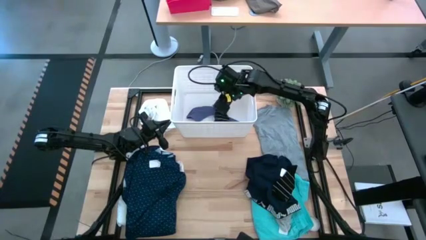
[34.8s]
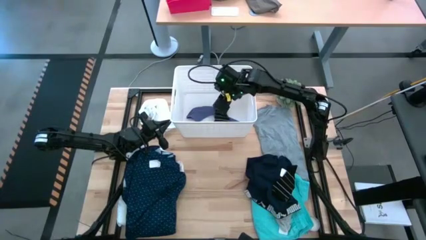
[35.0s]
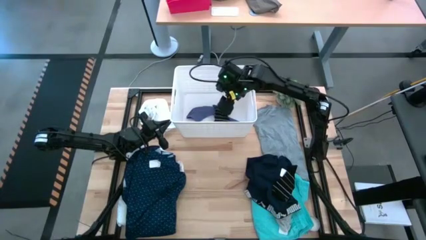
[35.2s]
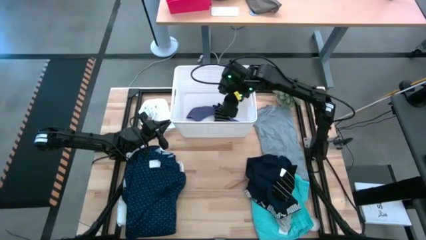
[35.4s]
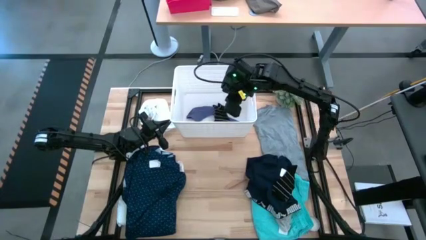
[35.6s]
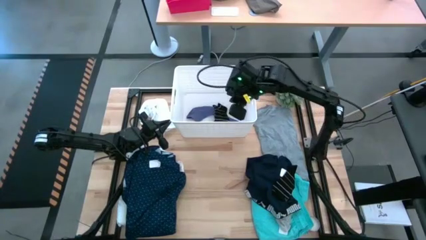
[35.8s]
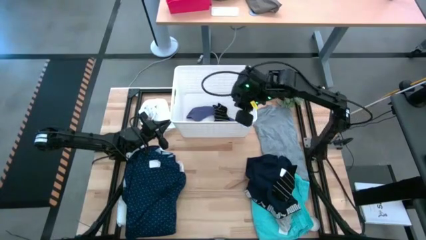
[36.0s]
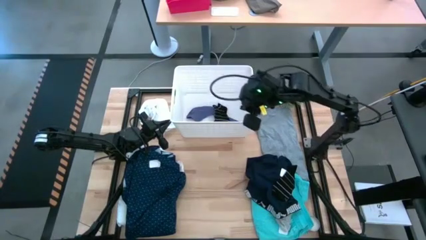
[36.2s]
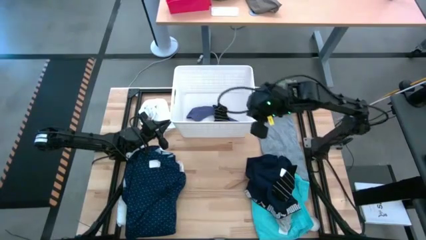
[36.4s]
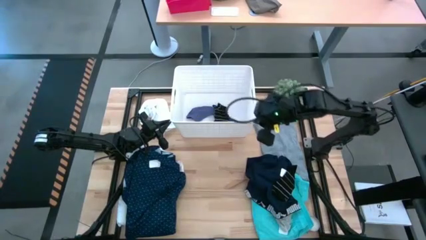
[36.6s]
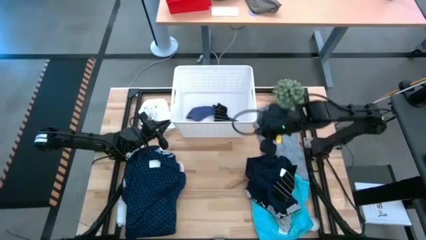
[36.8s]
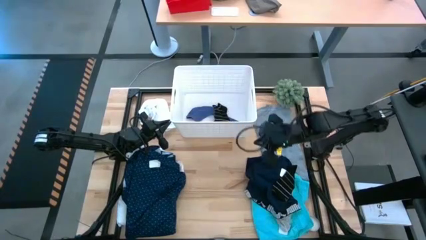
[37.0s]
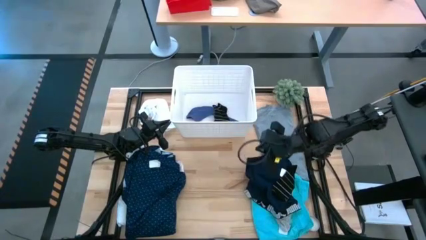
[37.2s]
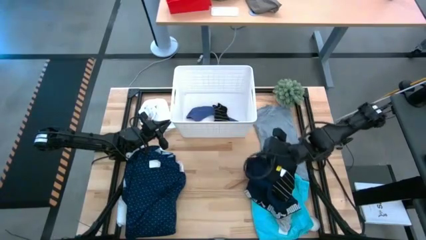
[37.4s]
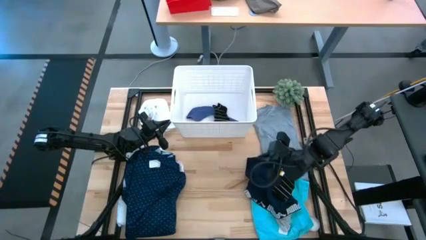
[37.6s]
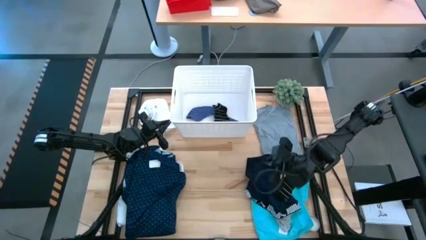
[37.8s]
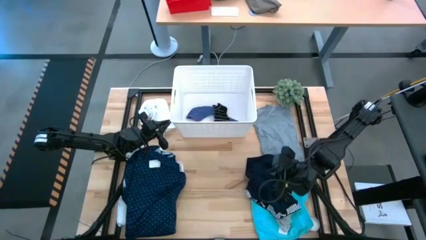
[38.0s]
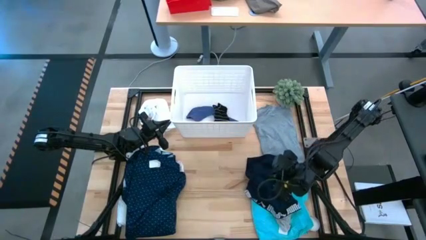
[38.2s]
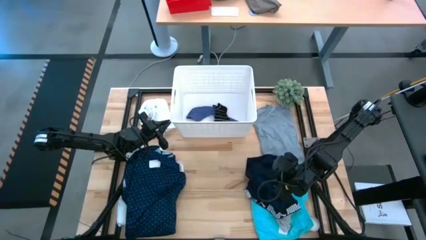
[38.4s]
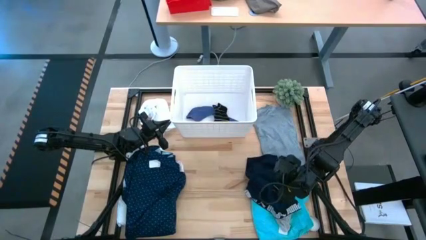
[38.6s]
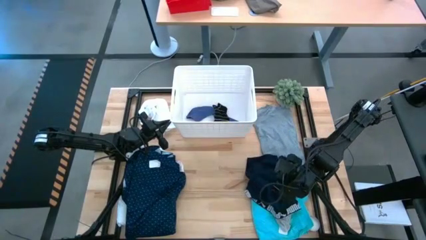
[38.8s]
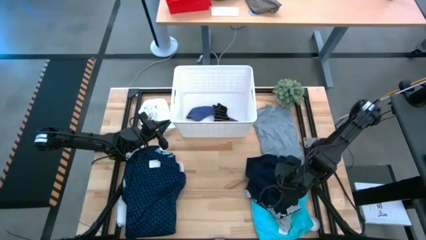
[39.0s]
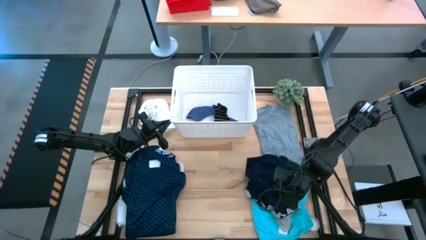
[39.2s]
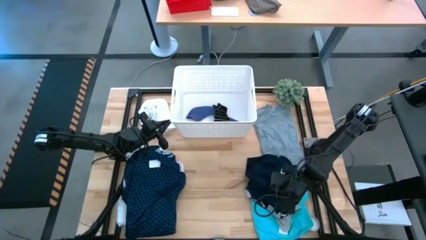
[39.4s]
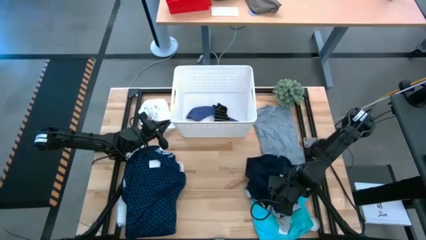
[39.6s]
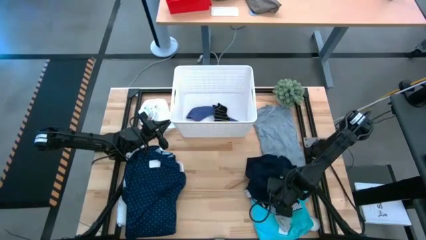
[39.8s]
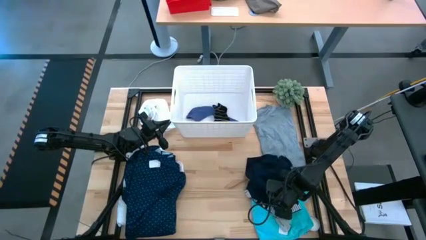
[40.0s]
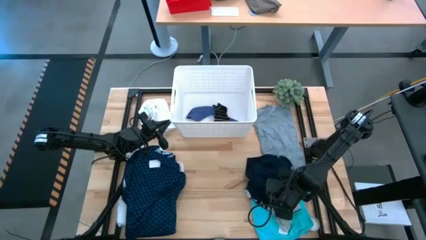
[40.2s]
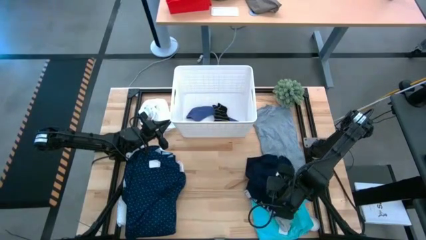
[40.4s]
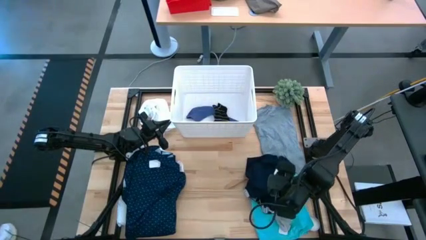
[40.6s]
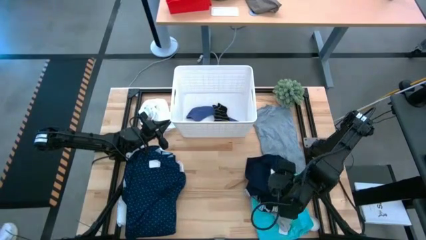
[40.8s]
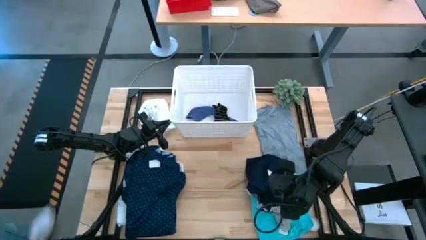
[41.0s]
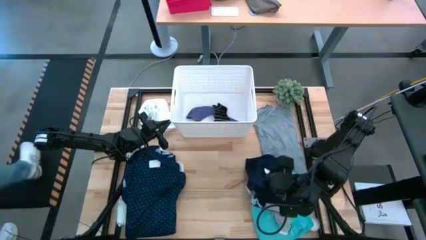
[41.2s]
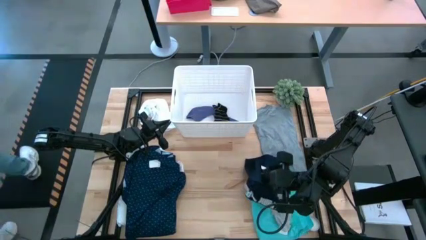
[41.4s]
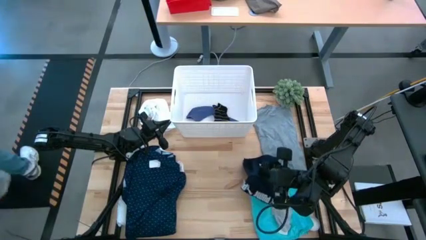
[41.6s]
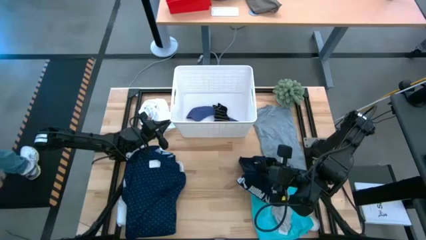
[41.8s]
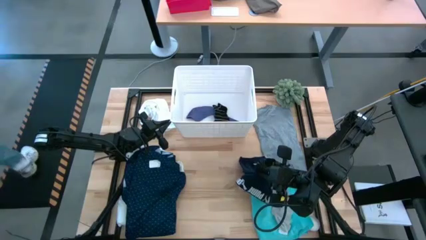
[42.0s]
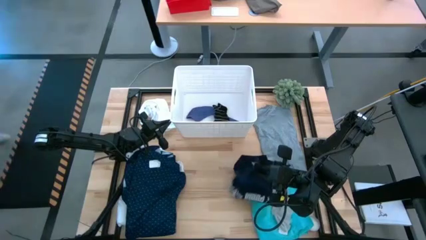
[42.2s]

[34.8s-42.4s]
Task: Sort clothes
Put the black striped sock into the white laundry bin

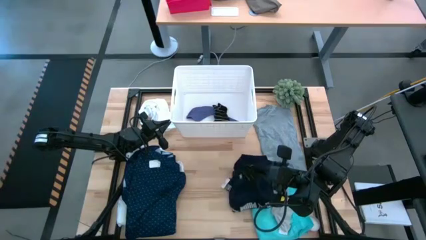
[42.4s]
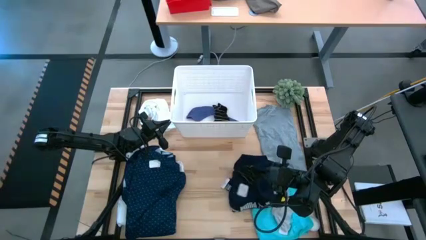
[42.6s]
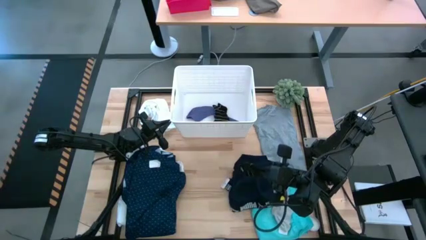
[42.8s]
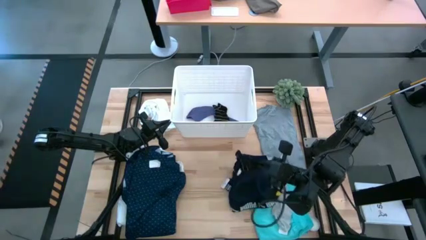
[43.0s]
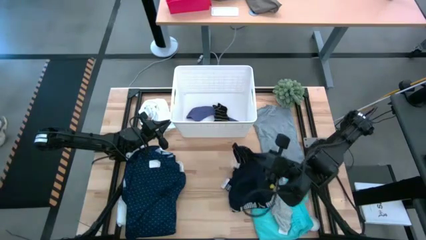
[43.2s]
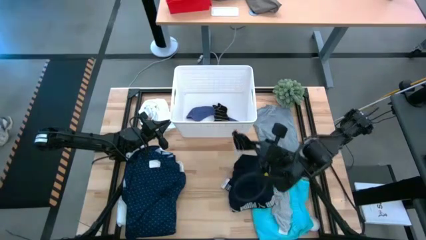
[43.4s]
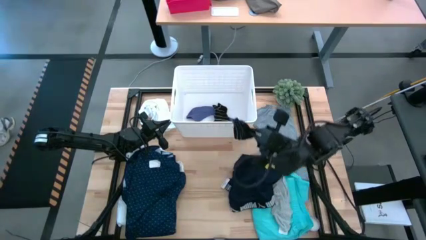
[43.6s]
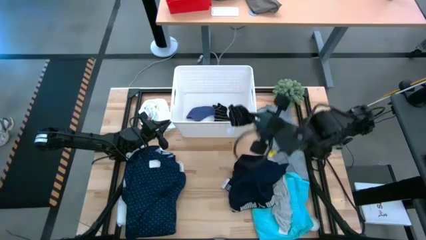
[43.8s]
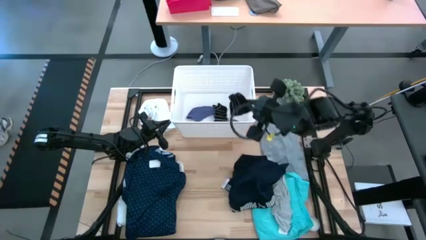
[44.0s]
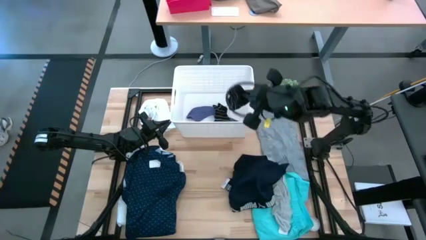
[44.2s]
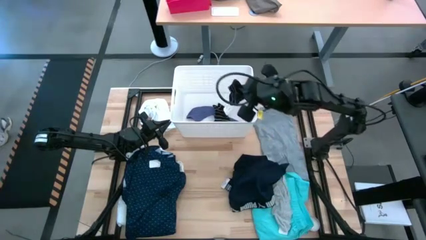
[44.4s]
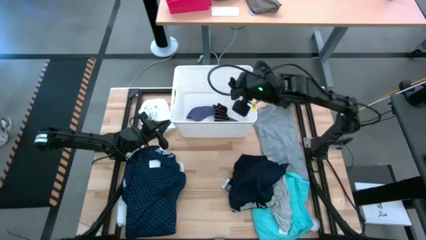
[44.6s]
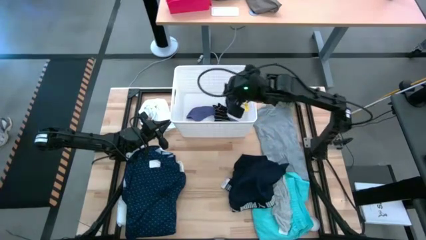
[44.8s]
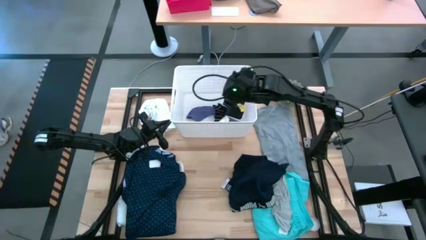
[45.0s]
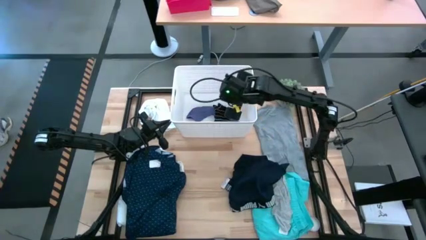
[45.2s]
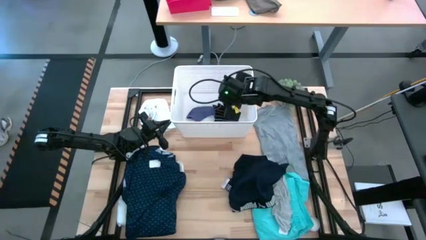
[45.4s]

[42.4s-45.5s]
Put the black striped sock into the white laundry bin

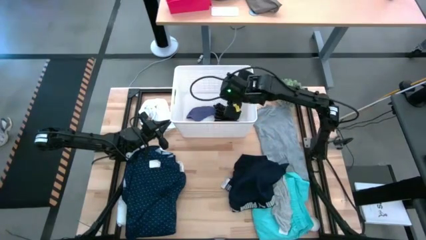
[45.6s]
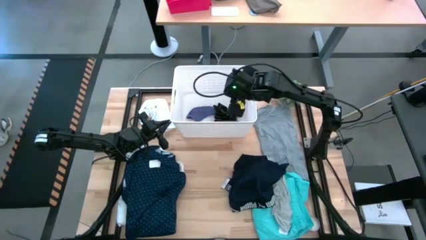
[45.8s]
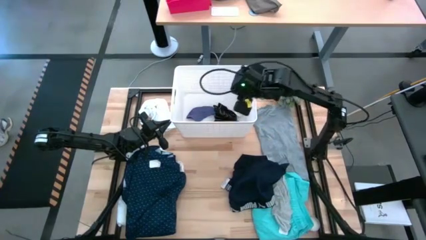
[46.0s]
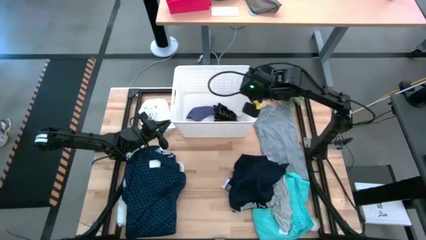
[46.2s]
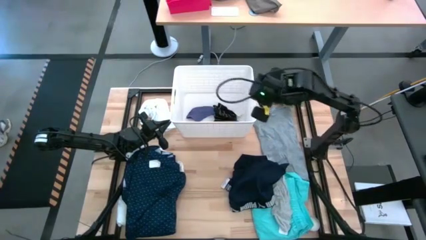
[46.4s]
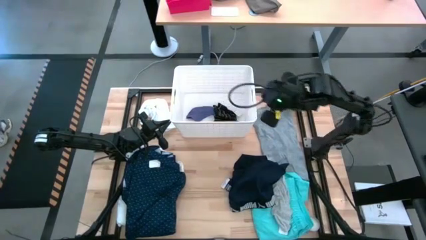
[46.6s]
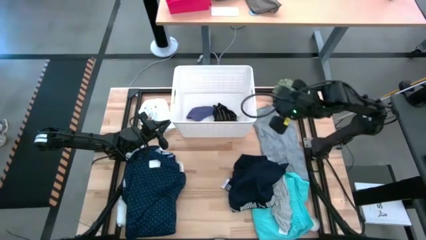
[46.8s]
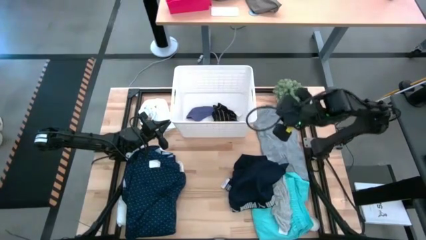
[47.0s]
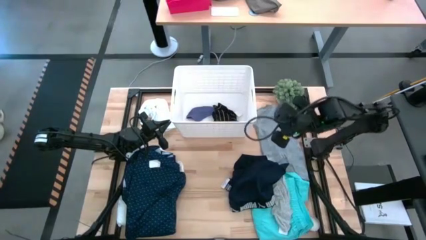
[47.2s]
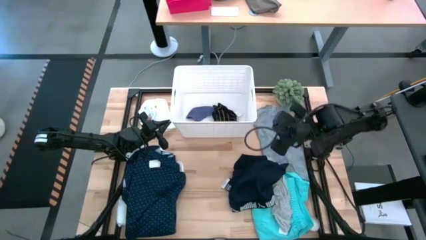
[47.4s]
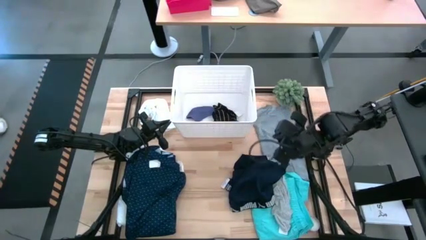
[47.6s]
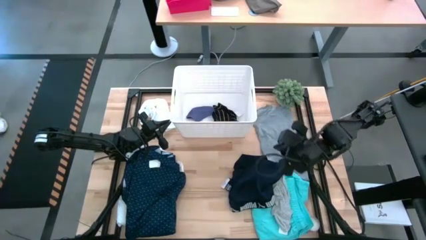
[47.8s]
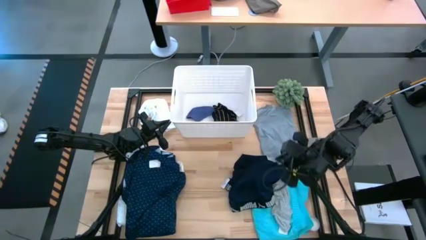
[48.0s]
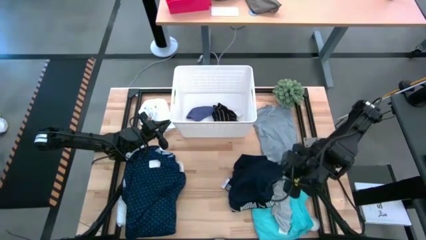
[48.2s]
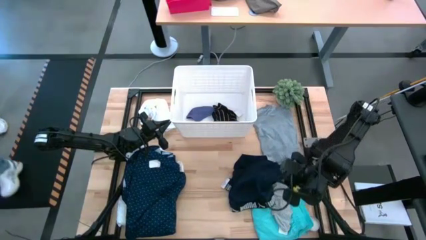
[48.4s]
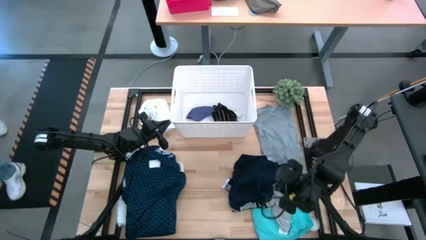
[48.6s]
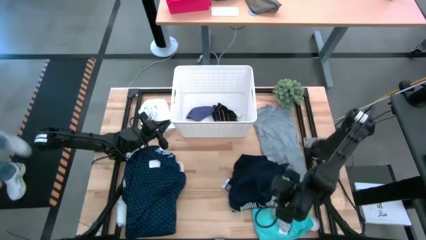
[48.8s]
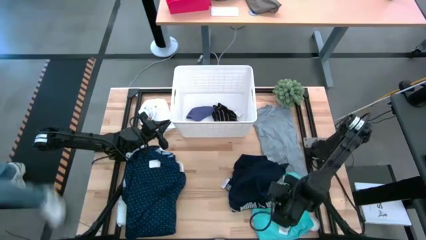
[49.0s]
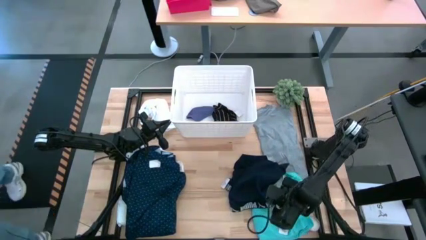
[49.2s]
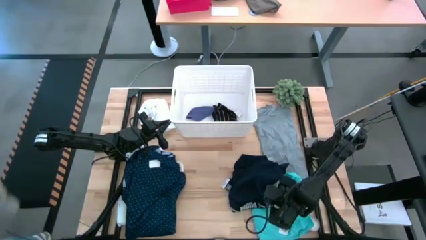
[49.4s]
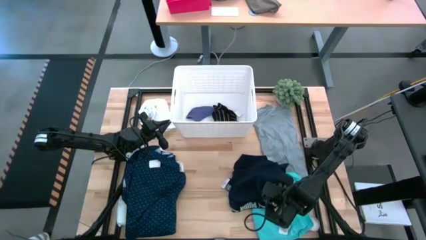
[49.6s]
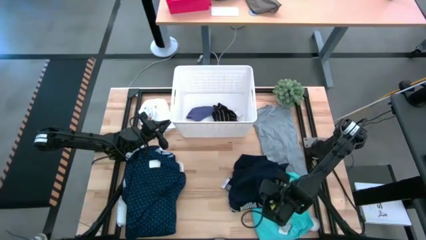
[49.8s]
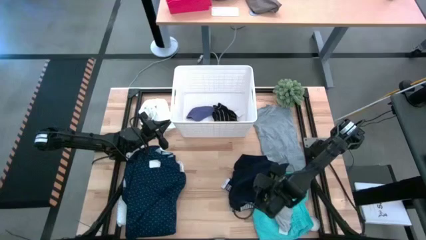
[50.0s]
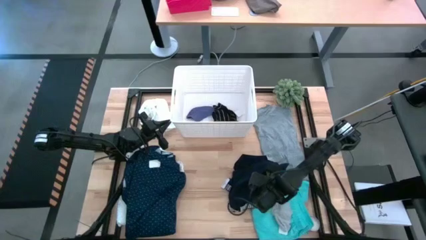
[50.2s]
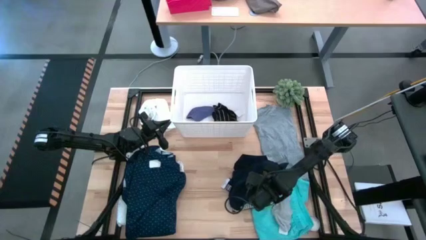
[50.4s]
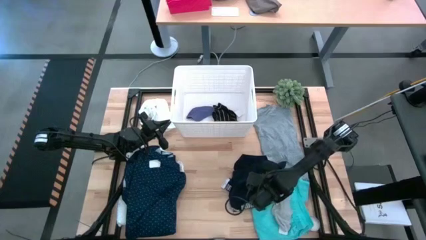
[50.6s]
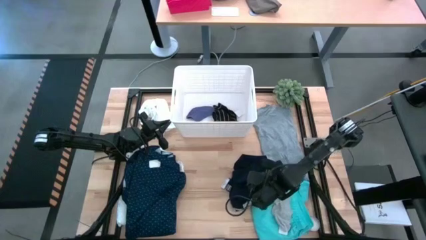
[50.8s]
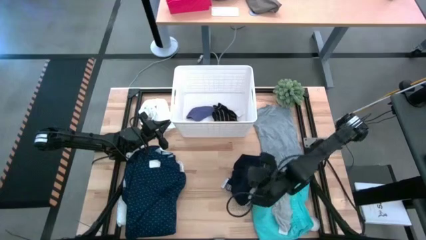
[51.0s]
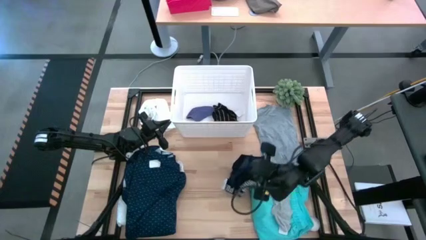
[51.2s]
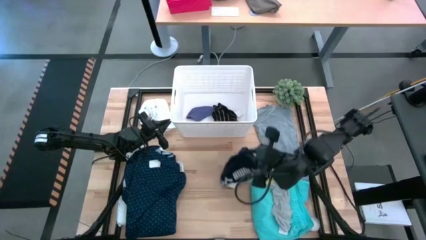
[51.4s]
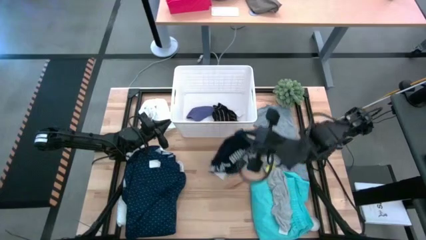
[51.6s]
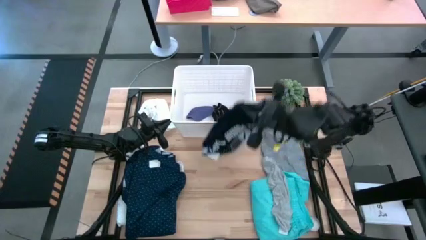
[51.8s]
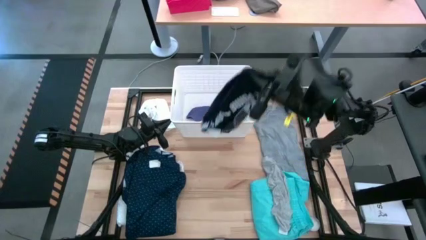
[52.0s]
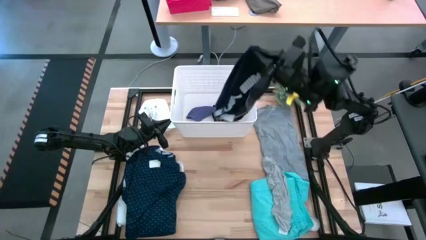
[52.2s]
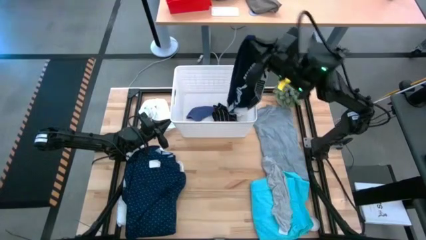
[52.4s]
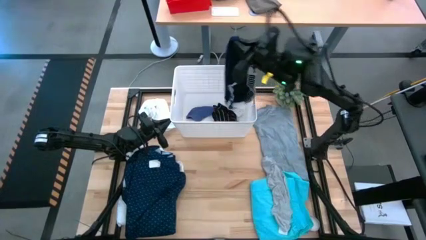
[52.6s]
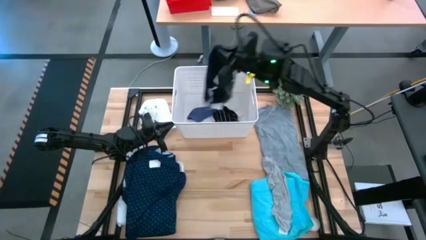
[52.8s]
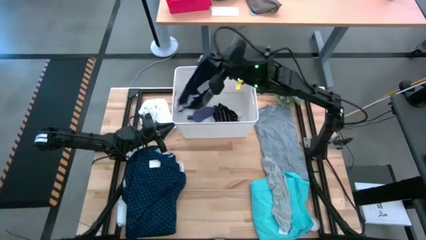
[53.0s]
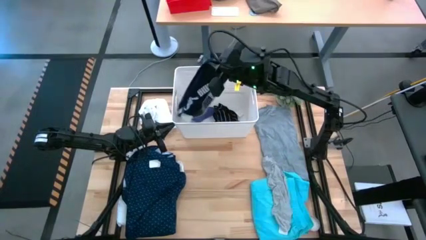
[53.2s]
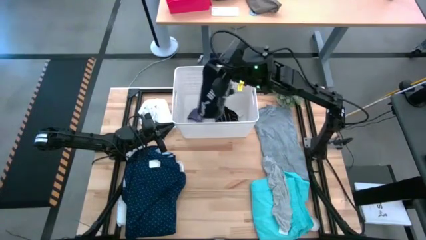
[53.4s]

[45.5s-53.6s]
Put the black boxers into the white laundry bin
